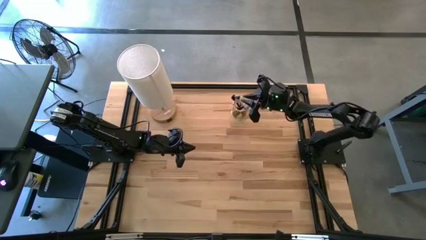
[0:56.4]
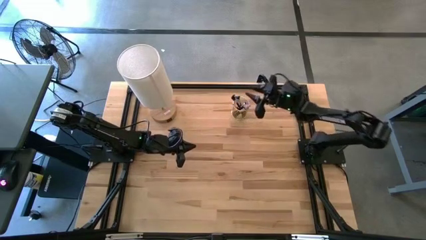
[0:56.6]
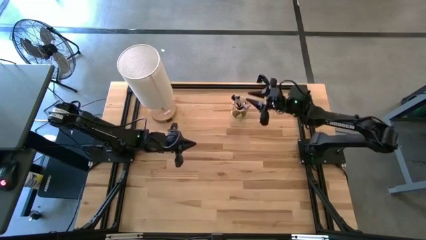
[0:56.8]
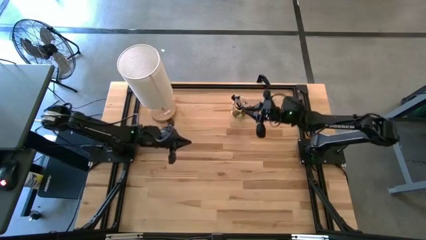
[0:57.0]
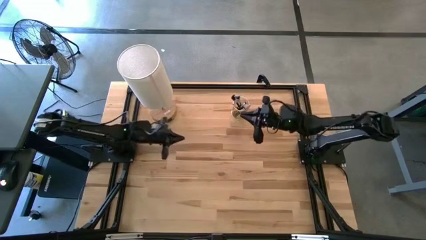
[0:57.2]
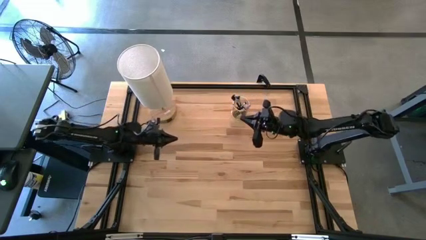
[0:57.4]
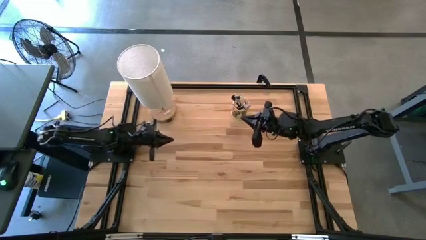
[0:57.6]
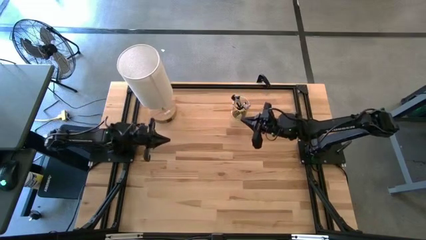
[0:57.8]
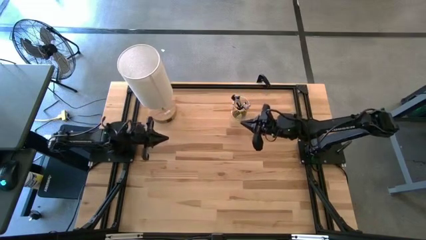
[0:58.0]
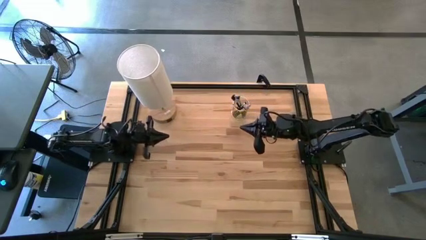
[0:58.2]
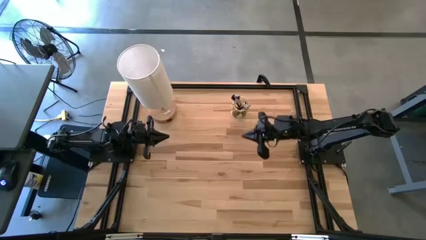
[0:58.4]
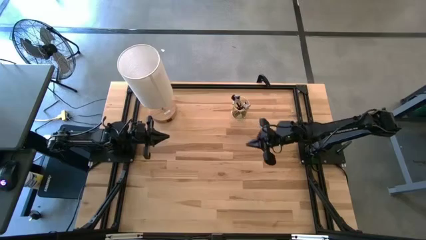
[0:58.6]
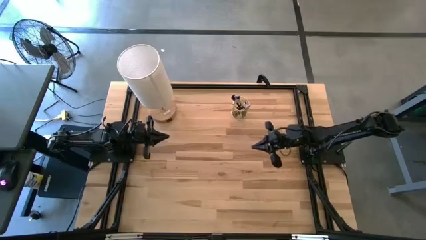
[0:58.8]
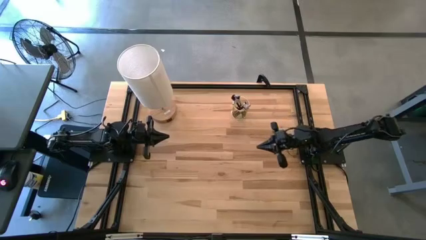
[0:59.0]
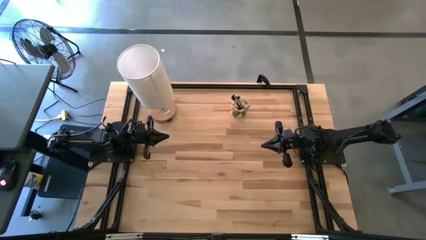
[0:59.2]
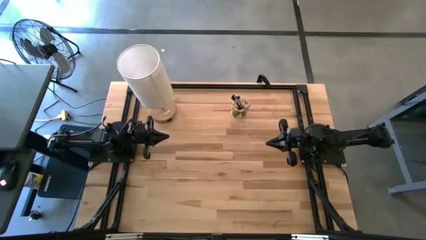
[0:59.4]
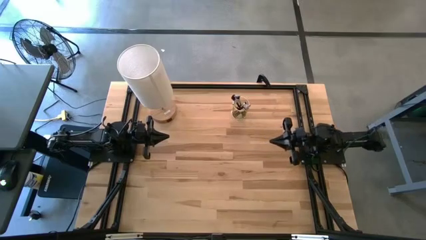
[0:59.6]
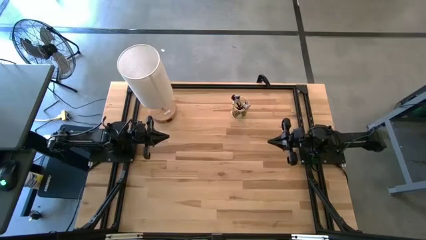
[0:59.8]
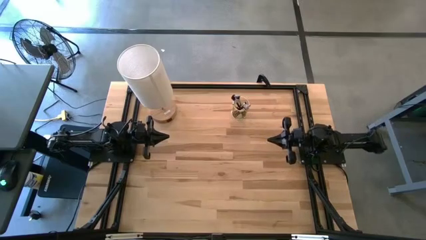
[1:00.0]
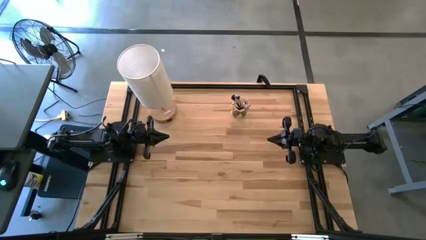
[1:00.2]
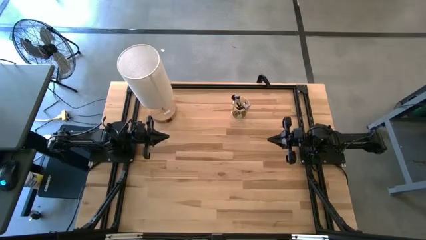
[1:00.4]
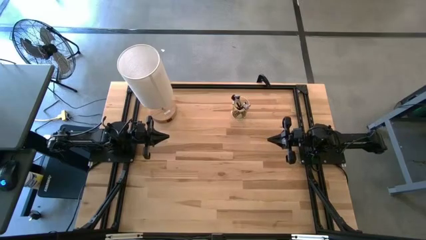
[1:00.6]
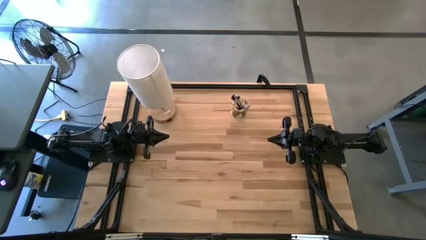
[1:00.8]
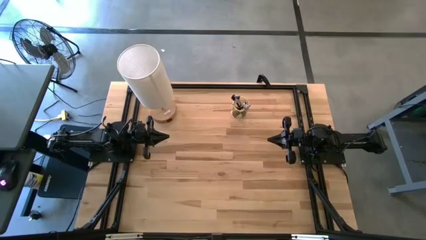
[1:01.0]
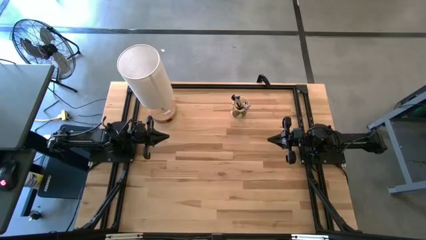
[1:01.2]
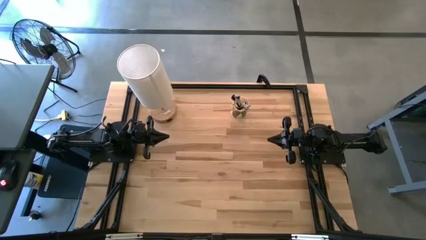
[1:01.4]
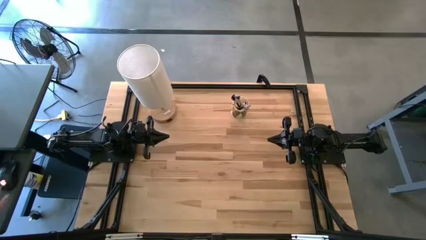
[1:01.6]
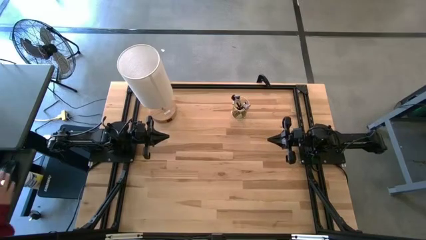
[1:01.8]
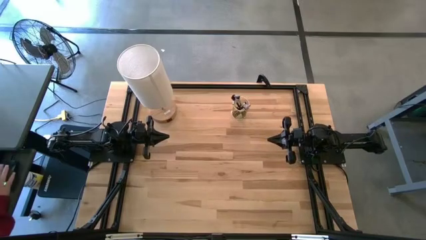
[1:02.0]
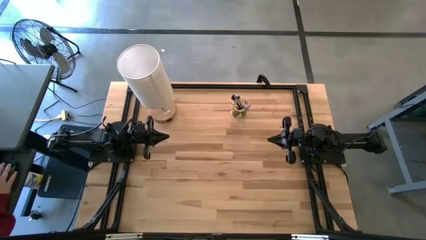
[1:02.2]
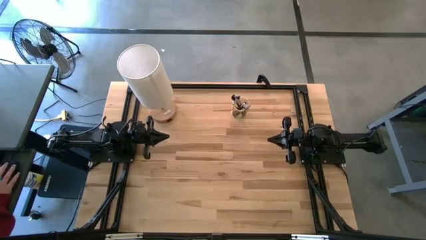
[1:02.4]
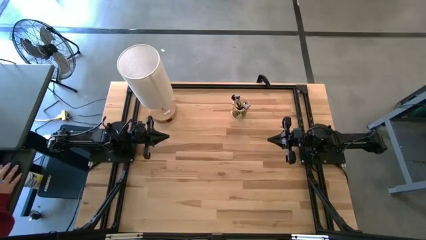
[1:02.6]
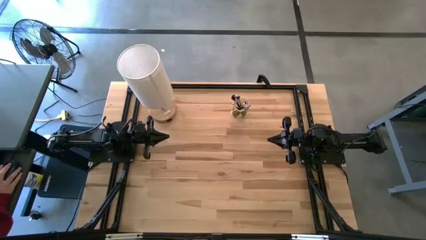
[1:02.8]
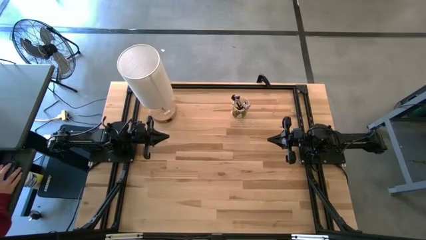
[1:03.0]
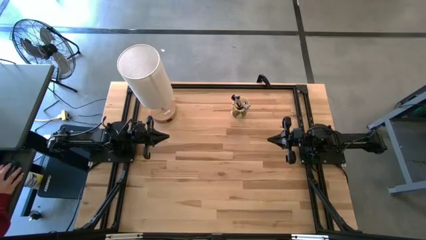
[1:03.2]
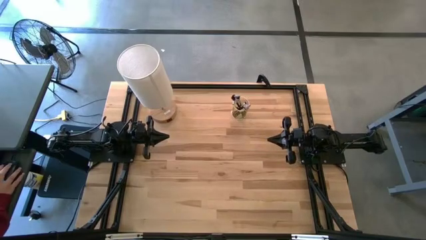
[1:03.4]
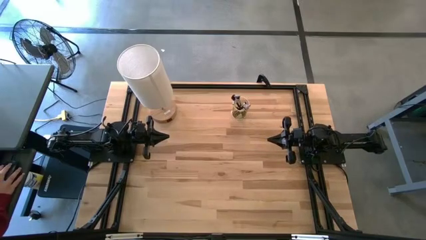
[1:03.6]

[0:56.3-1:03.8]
Task: Put items in baskets/containers
Return to Home Position

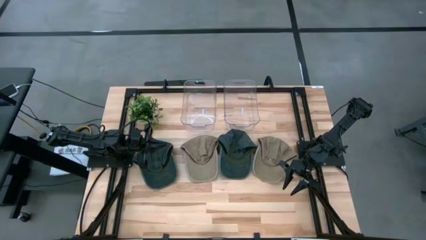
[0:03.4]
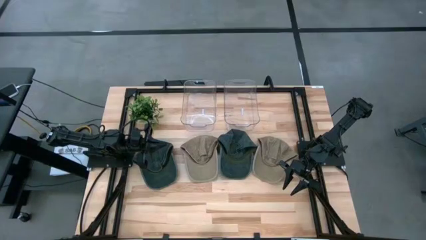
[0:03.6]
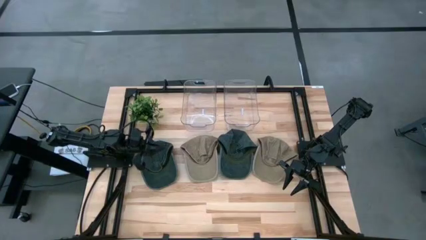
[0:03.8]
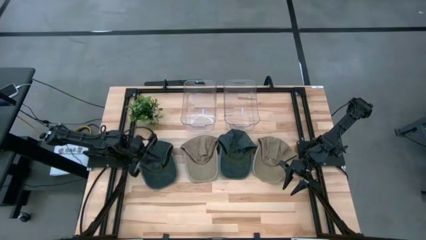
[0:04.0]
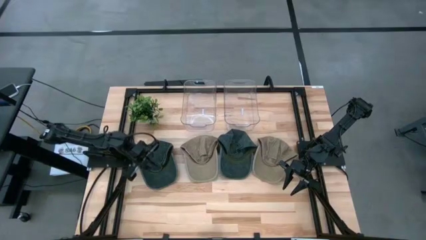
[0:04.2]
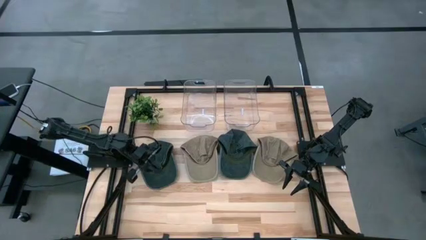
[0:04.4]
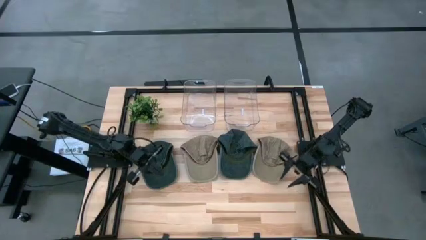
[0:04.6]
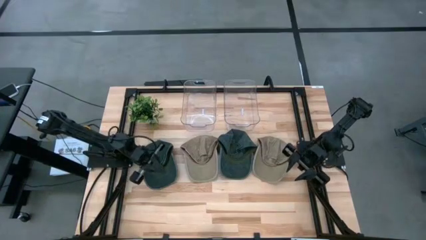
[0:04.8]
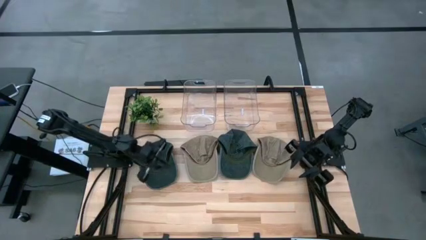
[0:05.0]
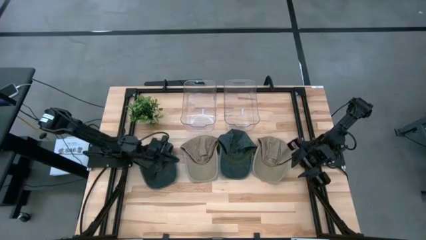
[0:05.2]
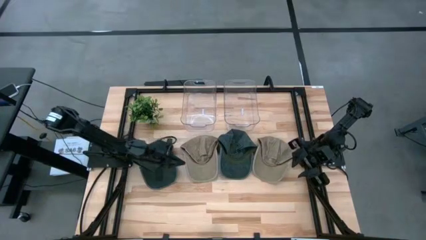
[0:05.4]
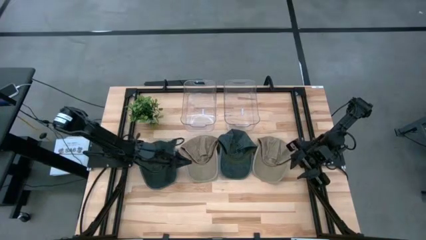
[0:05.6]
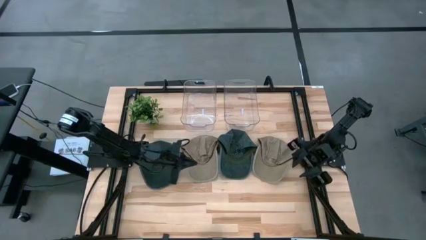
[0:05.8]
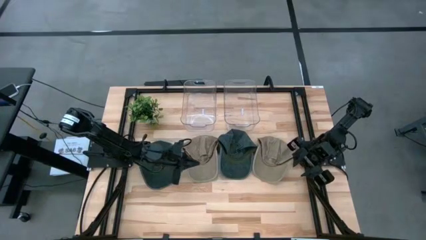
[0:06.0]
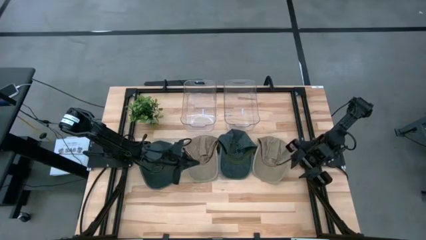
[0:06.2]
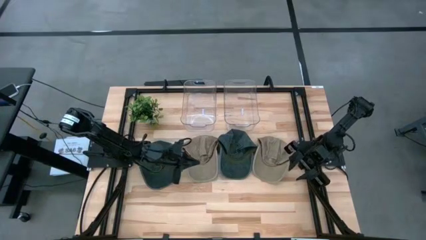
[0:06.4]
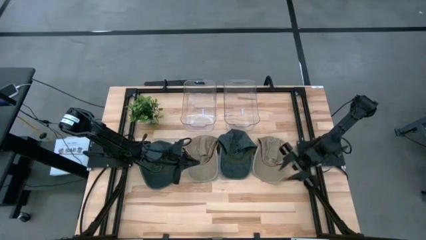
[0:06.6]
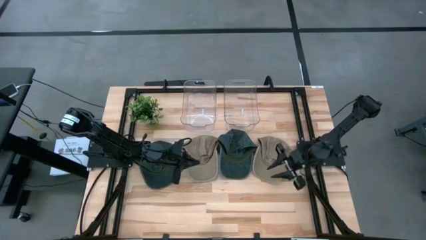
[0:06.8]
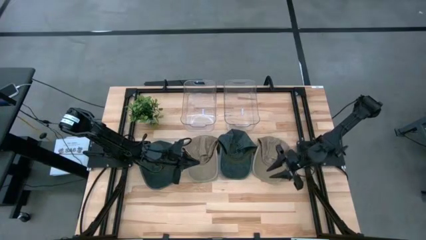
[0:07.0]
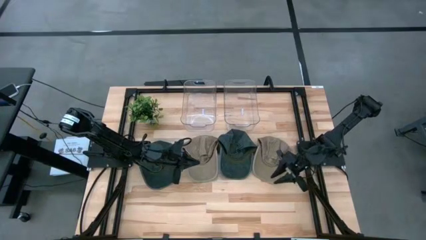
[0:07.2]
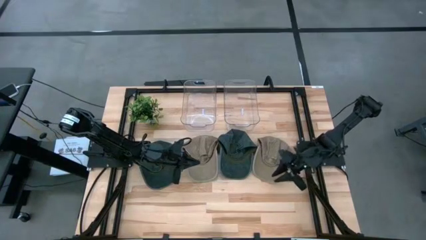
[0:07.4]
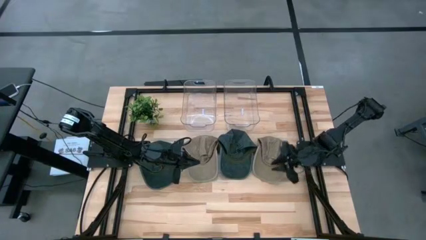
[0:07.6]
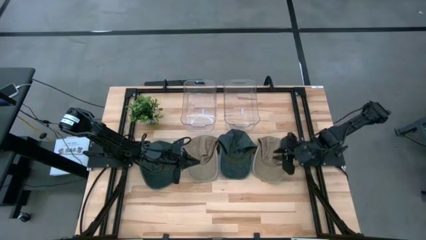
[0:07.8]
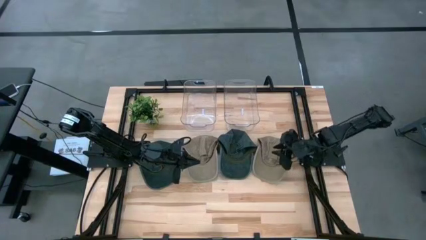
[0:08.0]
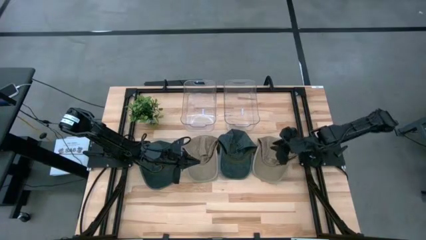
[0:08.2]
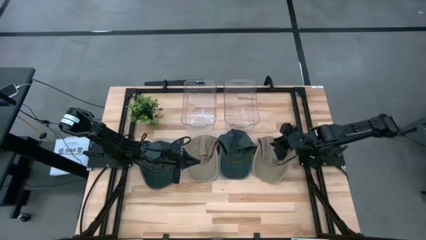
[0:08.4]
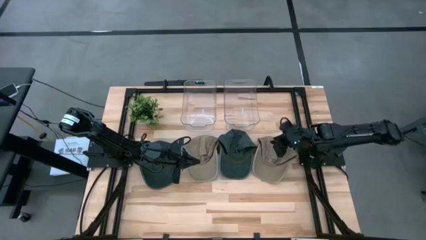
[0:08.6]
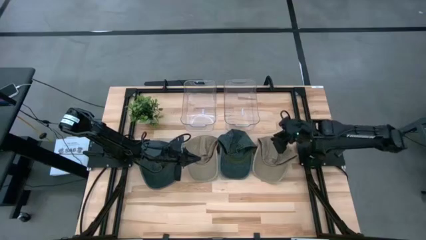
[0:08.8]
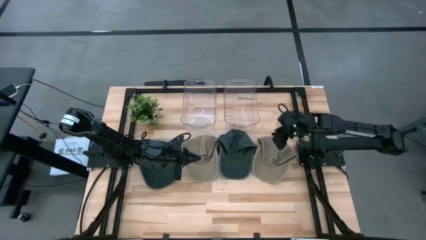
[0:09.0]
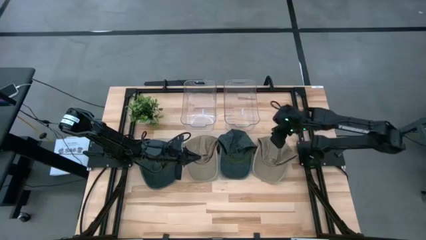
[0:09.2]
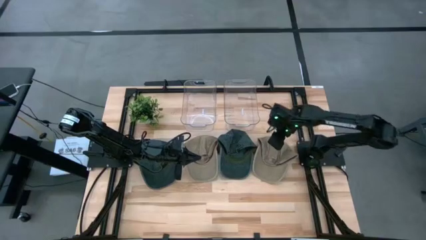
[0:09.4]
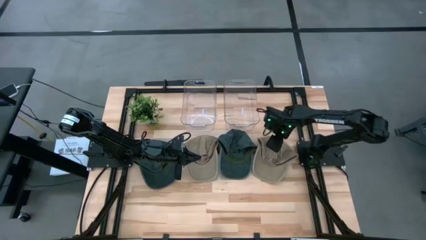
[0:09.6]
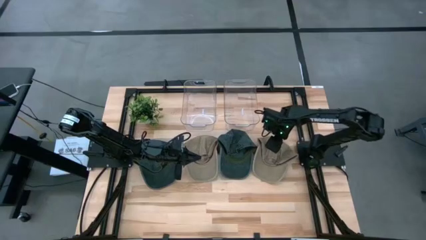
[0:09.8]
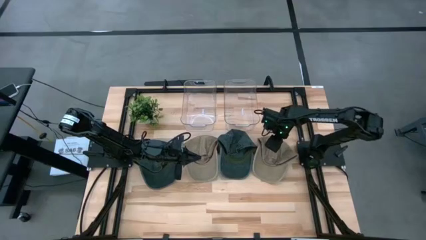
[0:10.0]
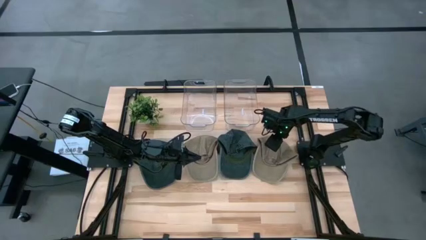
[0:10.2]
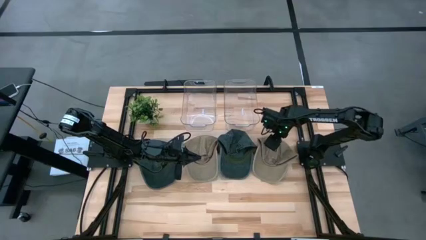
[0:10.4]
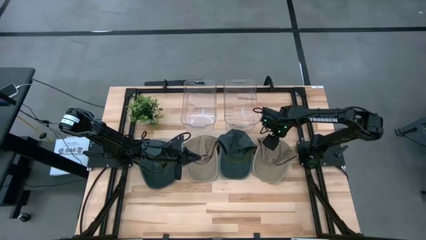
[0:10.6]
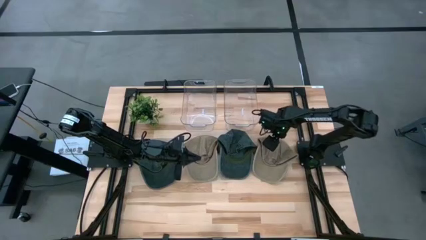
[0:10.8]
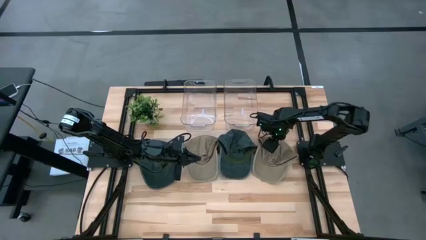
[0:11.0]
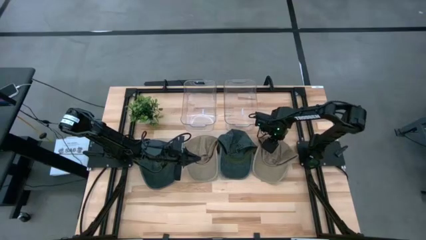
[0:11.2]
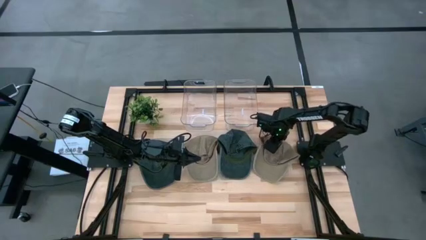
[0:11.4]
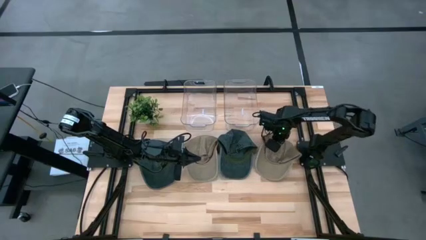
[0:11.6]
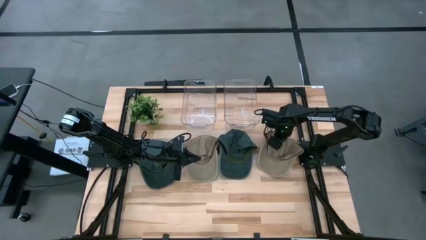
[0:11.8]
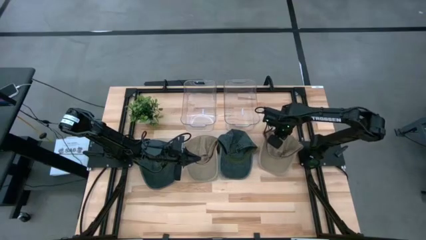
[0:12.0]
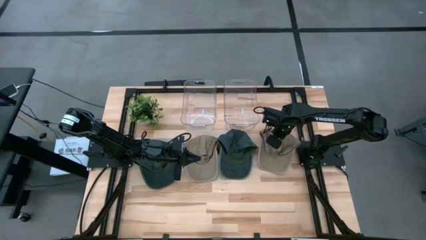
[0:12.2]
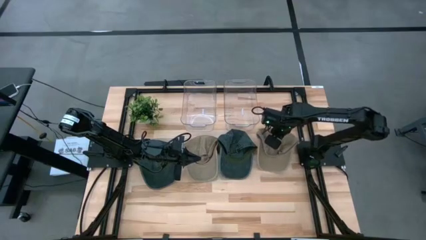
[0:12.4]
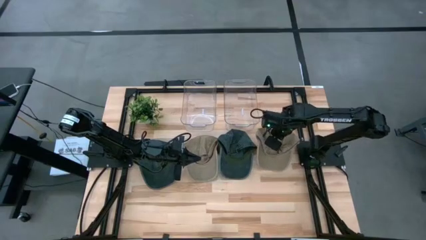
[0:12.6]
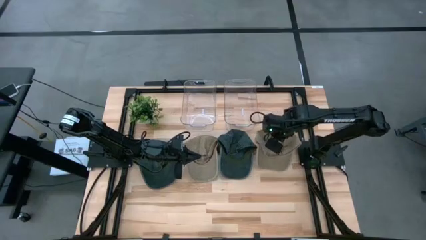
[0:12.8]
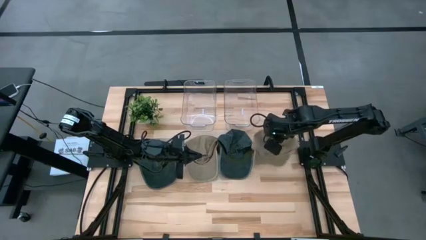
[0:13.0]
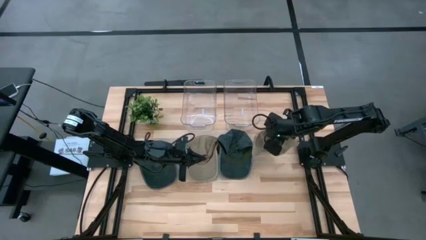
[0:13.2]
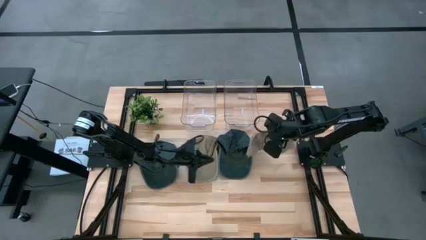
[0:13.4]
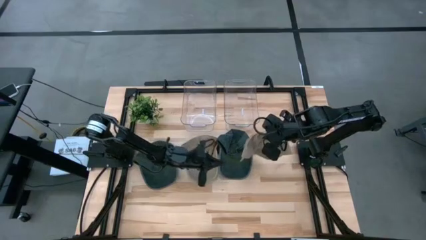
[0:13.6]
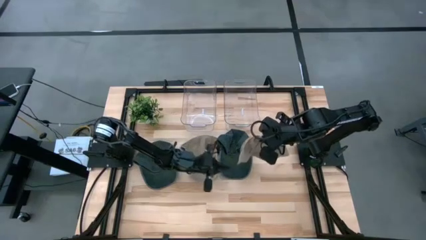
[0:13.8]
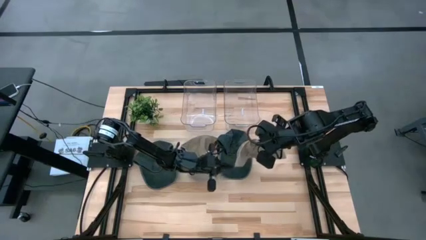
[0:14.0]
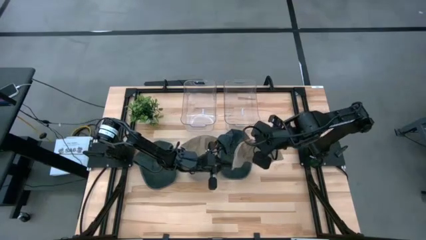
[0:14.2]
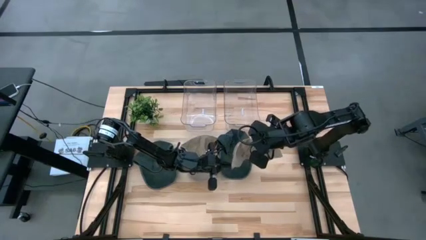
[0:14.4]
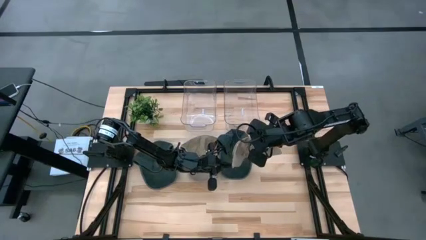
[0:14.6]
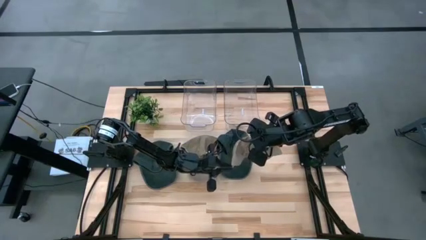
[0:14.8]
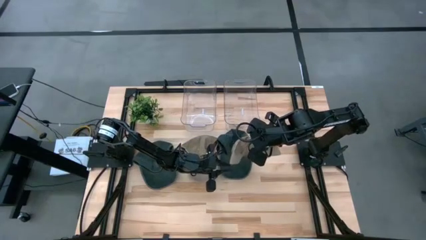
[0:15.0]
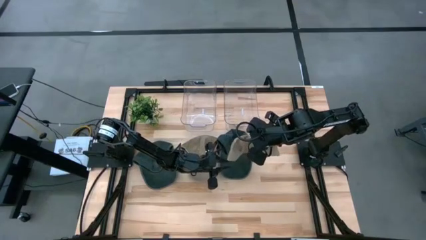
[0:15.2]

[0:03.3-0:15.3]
Task: Pick & Place hat
Put the right brown cap into the right transparent bin
